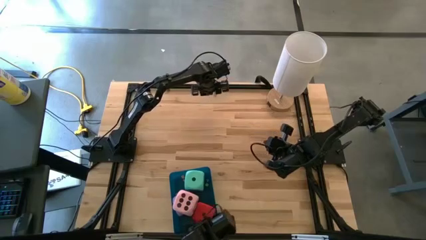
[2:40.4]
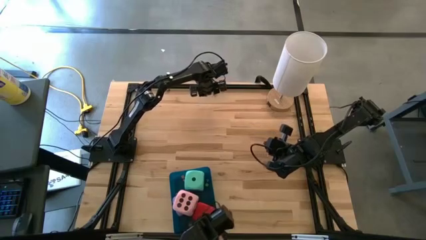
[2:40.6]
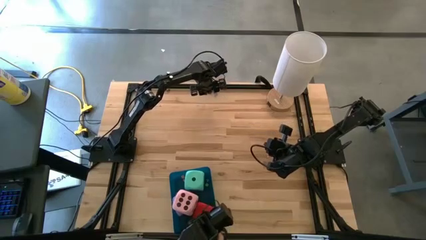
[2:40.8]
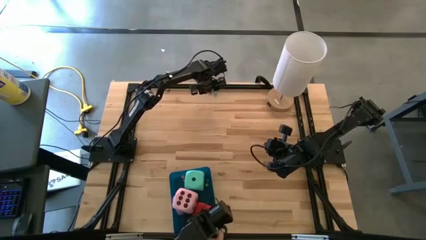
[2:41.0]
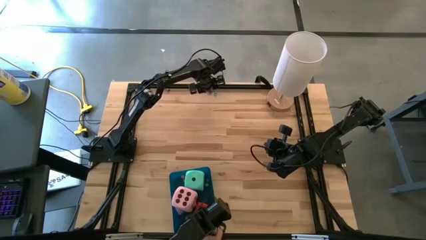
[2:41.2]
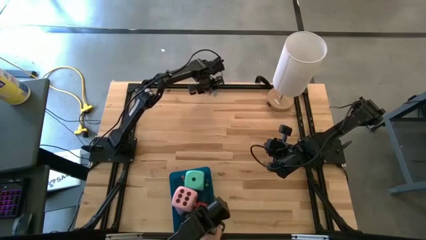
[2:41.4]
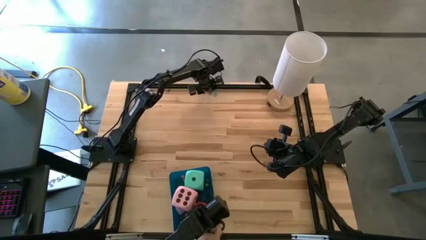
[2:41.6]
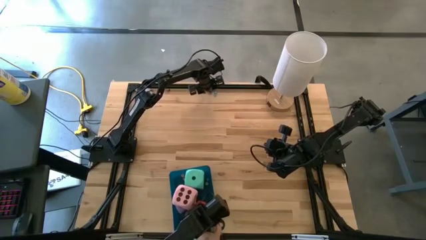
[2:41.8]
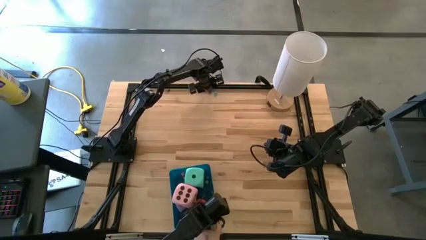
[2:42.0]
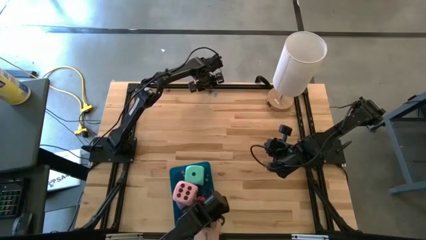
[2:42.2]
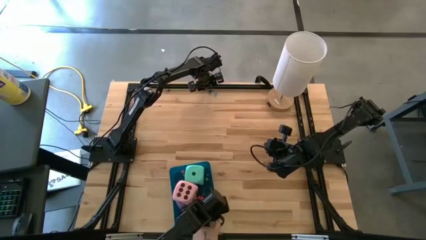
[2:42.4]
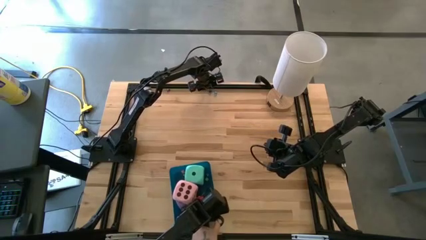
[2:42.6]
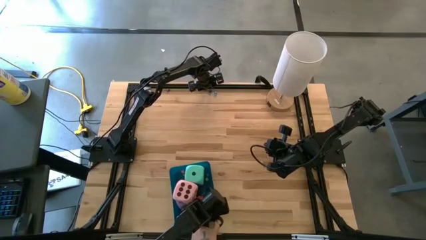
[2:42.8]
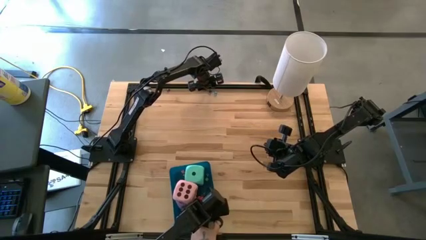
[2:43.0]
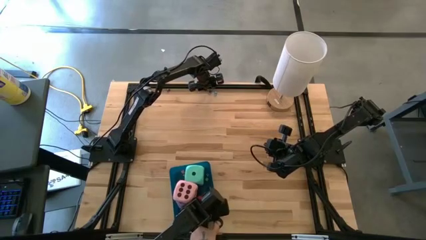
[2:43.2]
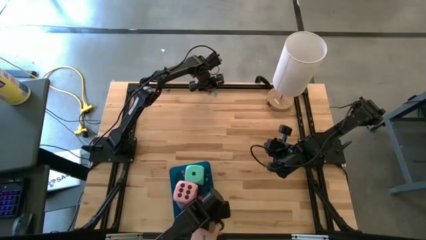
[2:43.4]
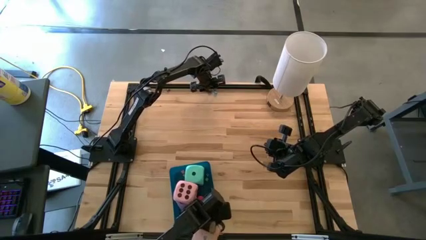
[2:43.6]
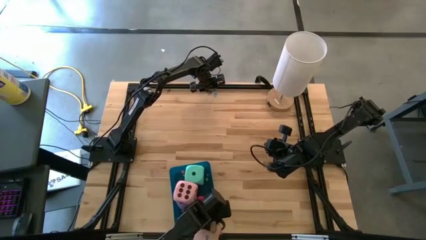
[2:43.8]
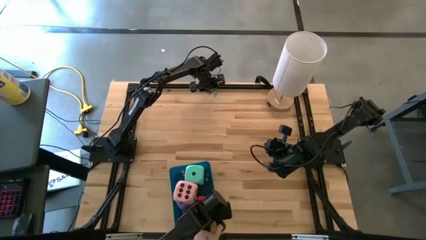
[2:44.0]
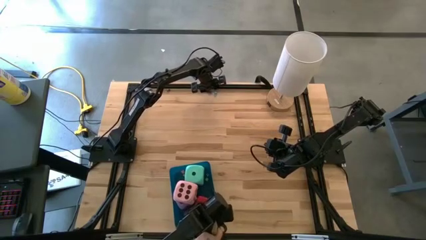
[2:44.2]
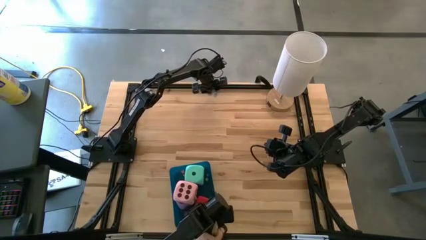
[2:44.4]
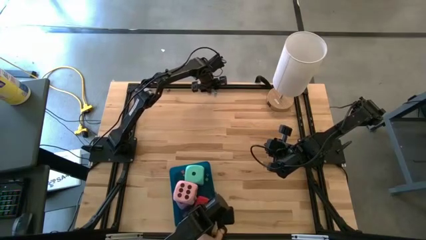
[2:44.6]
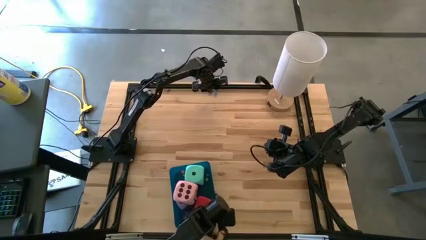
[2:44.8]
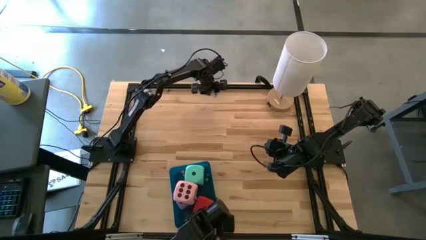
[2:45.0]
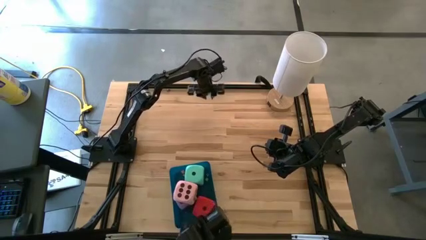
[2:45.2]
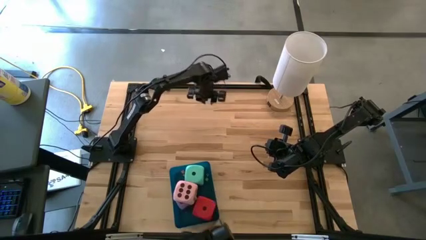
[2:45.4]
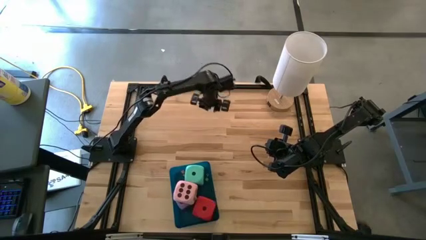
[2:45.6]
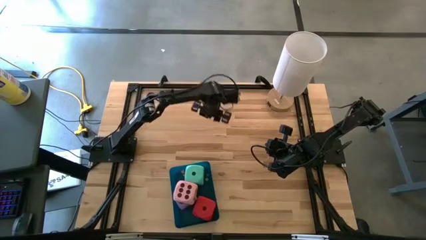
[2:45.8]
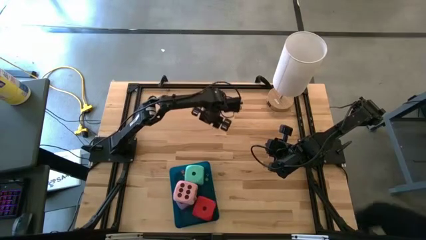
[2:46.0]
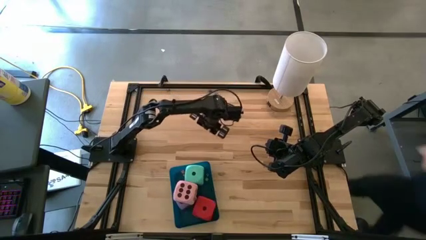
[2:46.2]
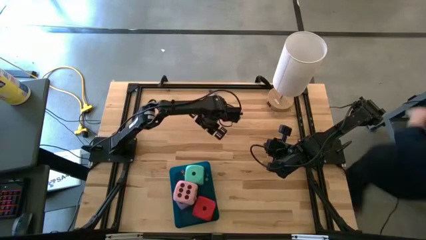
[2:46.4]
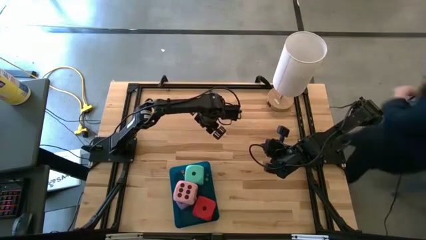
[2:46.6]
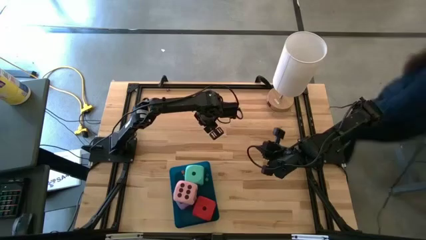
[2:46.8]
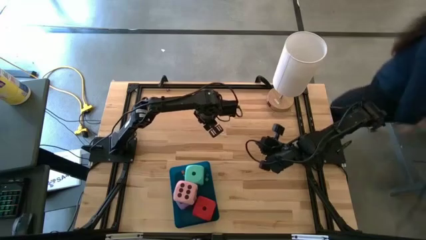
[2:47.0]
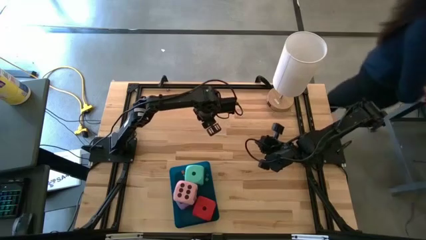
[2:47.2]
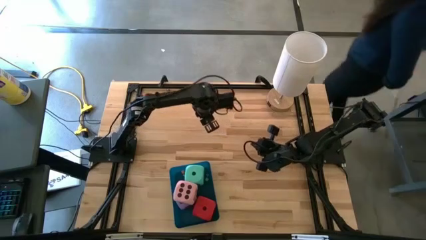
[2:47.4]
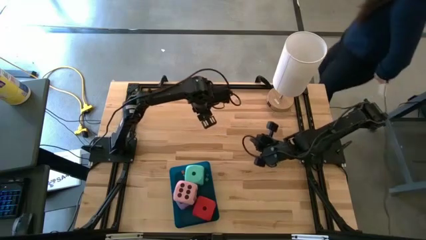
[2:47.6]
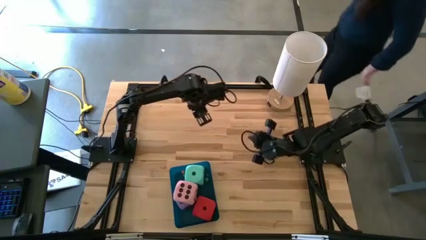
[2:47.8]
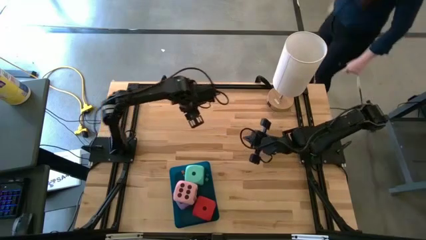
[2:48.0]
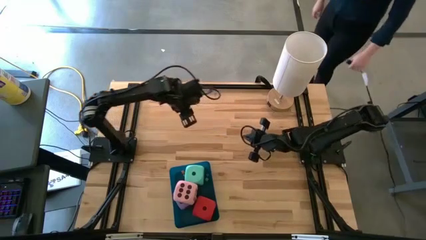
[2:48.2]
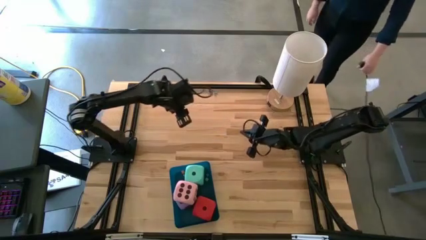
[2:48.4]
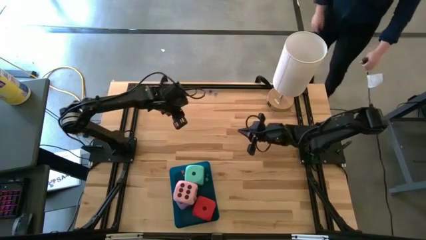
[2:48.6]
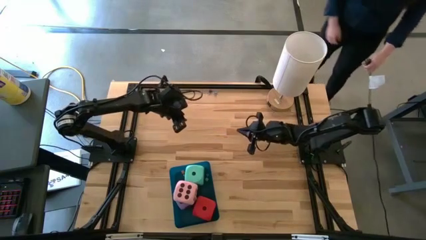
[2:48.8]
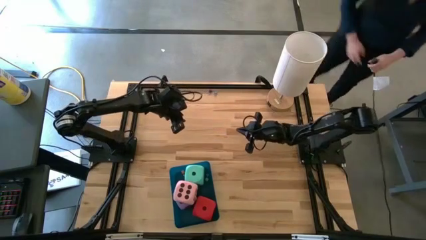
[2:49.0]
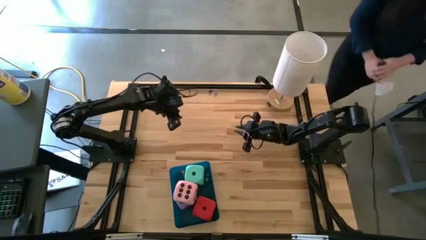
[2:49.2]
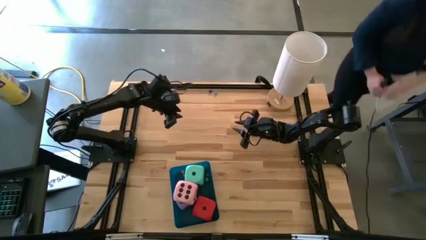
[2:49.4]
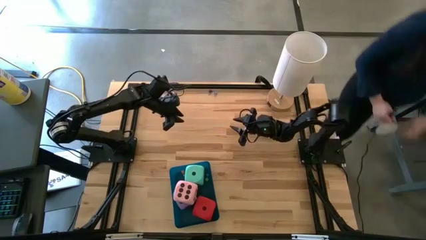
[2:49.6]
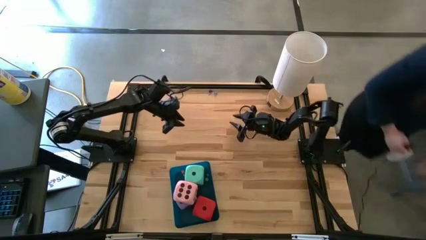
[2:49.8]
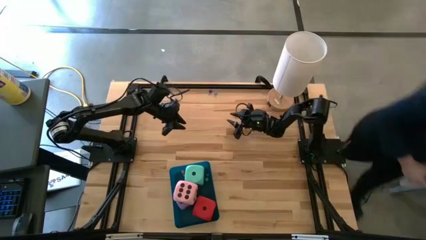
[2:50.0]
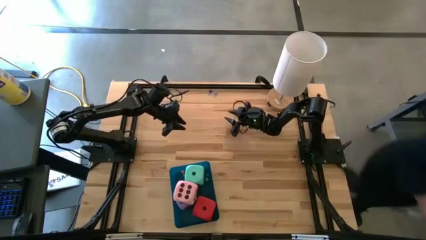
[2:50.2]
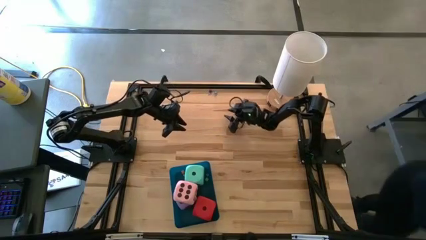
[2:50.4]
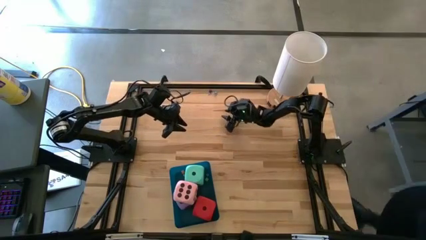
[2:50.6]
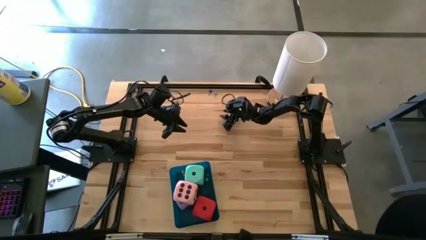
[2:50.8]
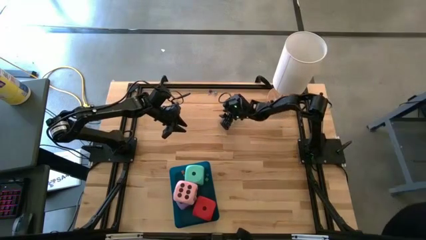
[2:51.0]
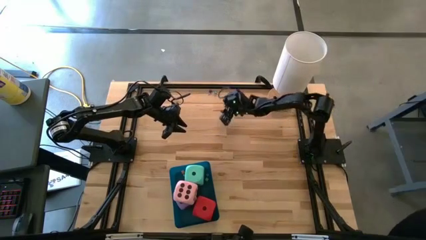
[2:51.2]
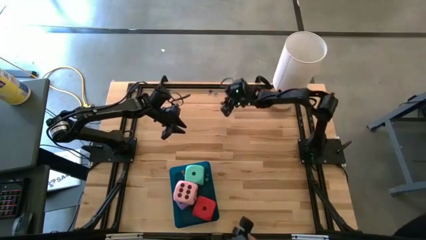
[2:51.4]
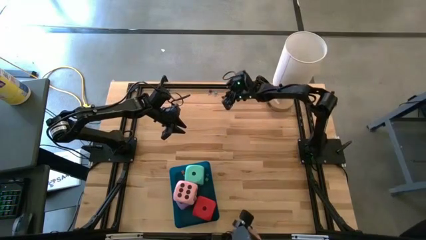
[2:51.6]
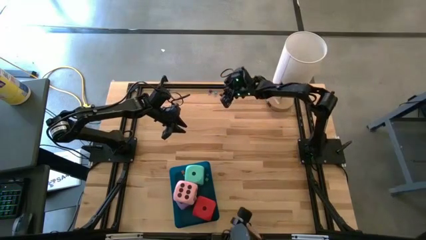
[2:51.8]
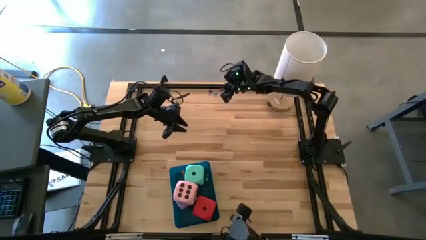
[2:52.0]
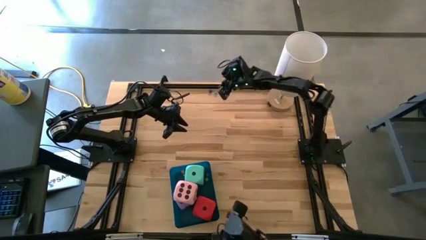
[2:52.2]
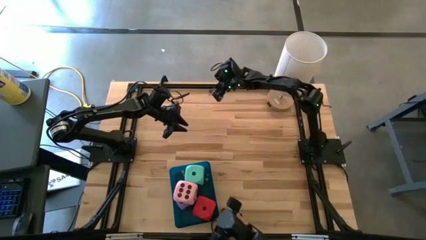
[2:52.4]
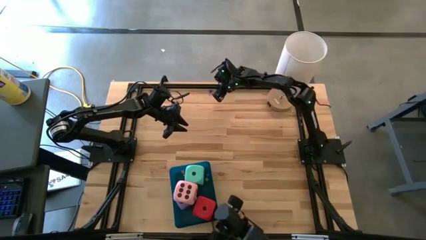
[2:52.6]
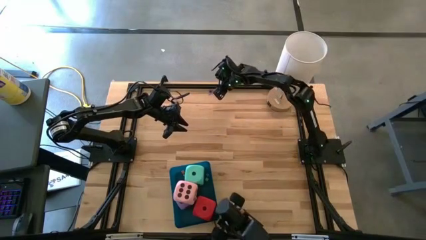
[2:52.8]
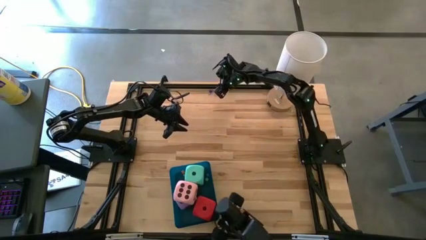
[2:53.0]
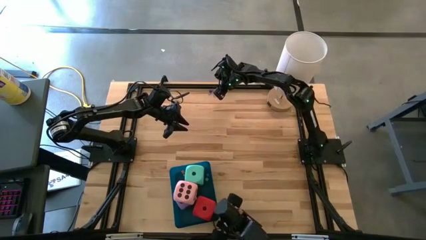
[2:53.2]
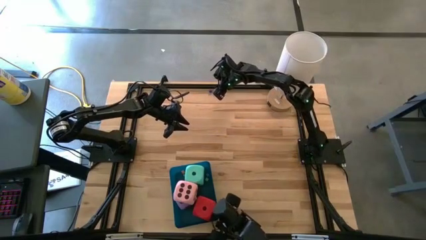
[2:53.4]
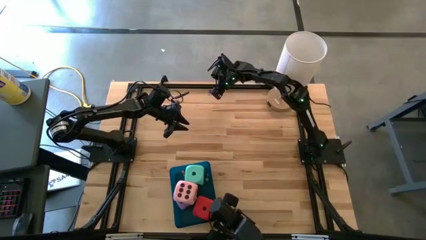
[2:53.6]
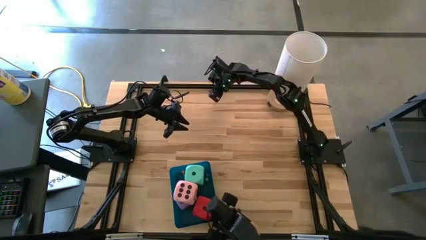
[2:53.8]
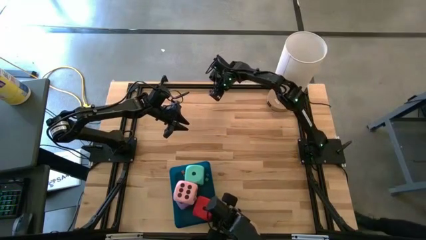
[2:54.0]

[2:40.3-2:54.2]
Task: Pick & Place Dice
Put the small light blue die into the blue bin
